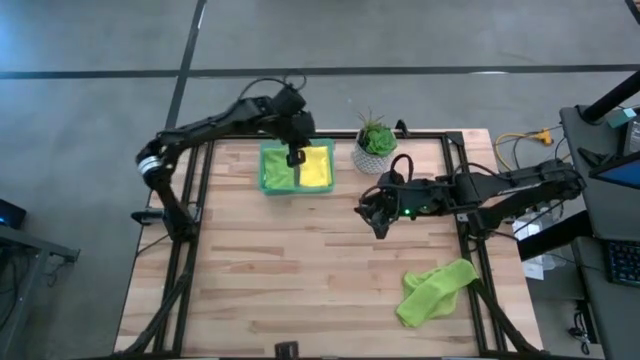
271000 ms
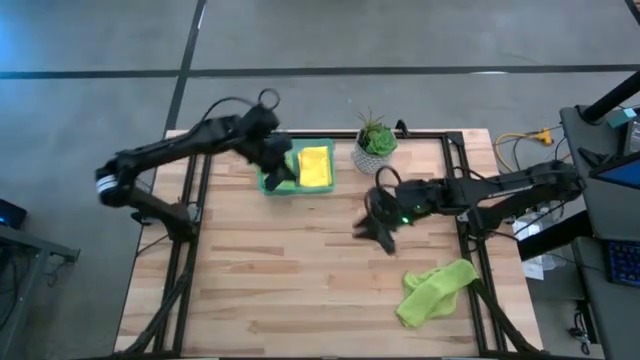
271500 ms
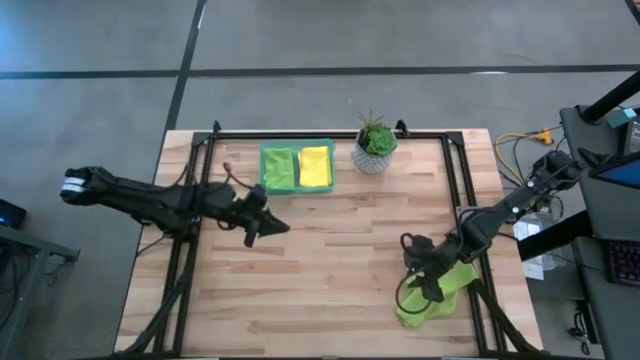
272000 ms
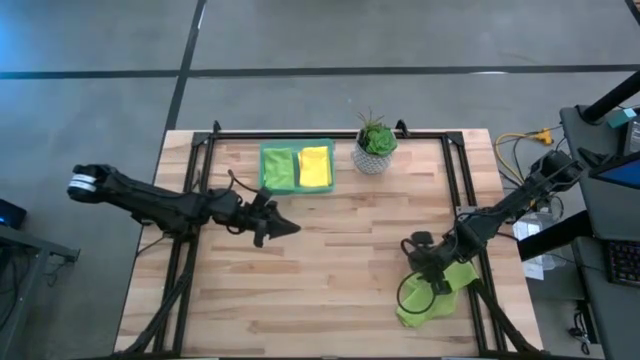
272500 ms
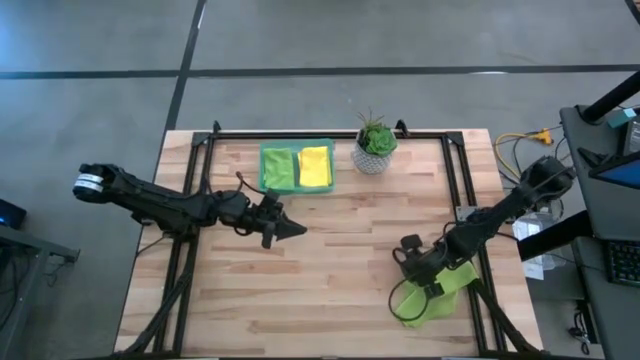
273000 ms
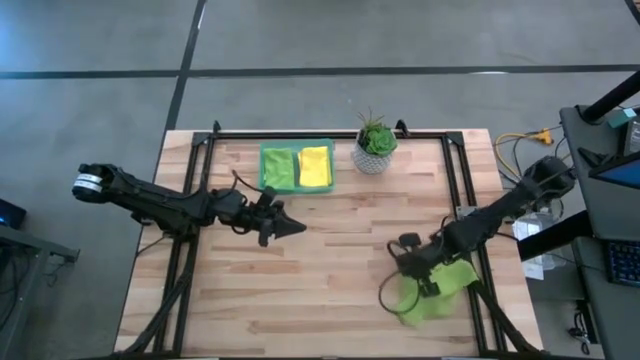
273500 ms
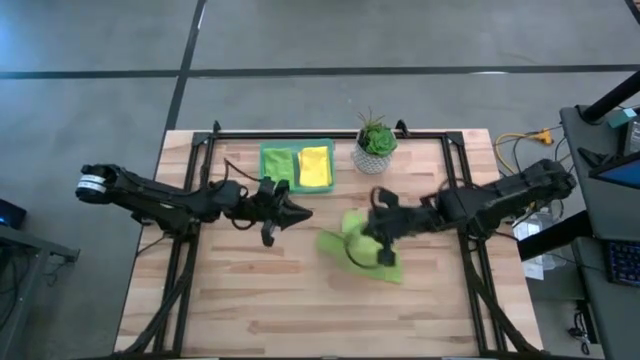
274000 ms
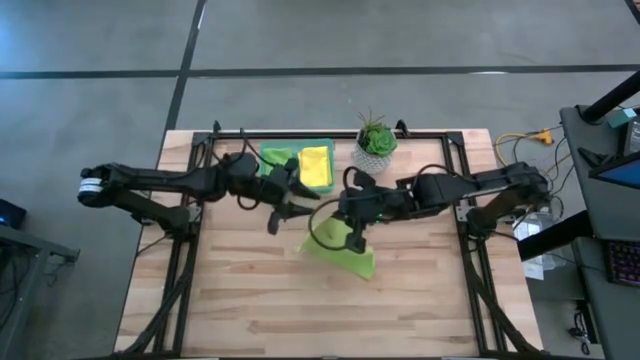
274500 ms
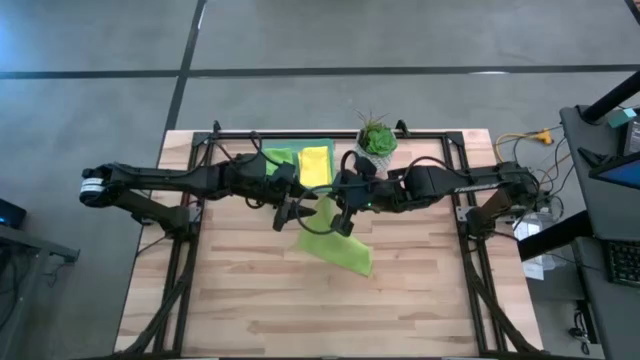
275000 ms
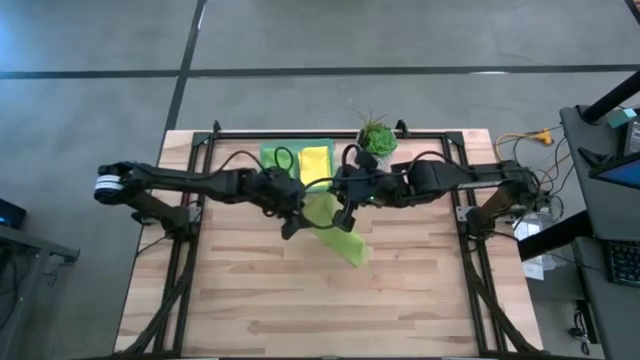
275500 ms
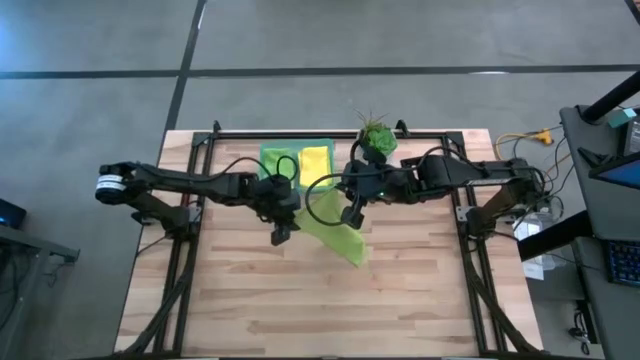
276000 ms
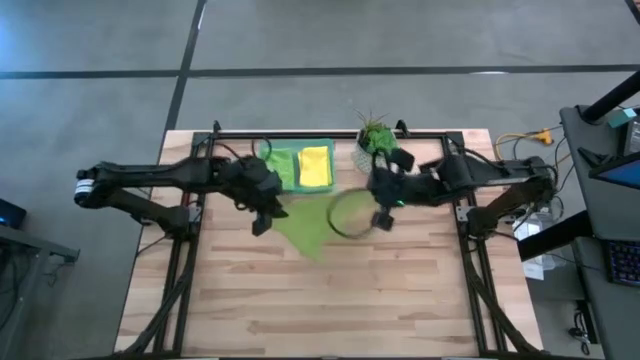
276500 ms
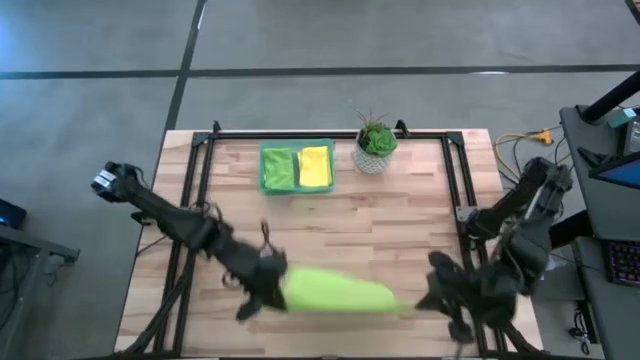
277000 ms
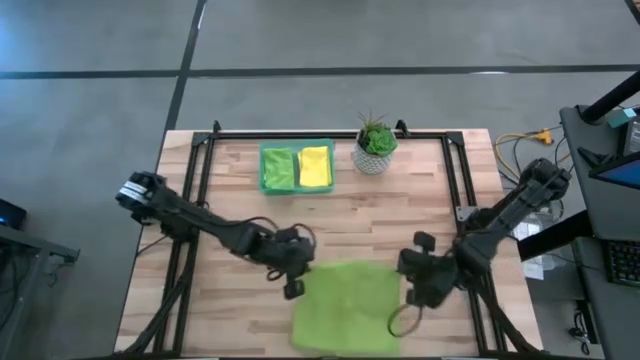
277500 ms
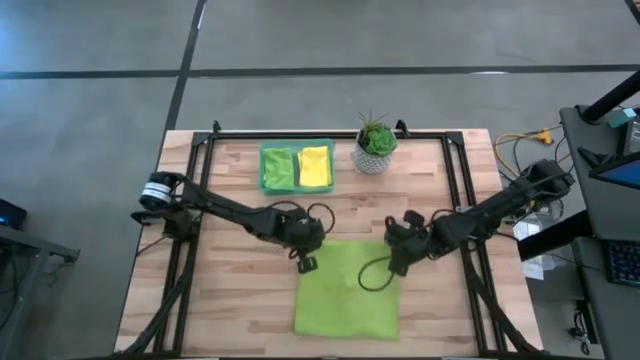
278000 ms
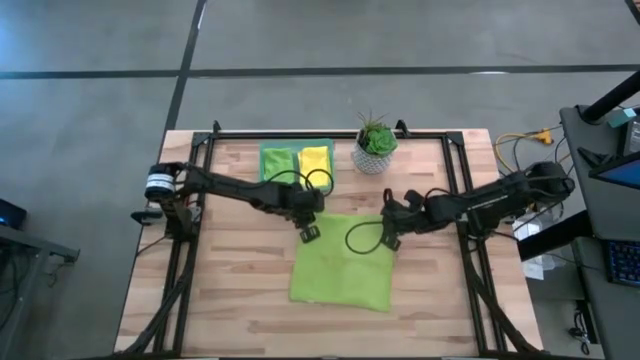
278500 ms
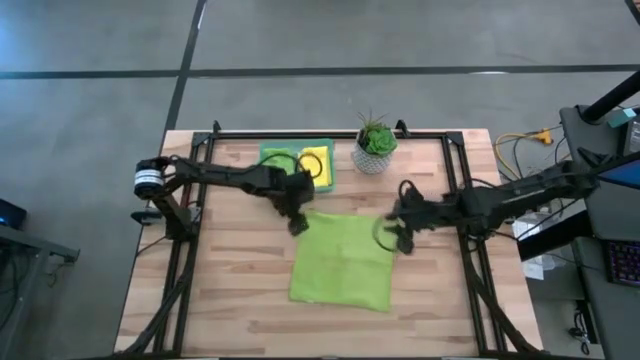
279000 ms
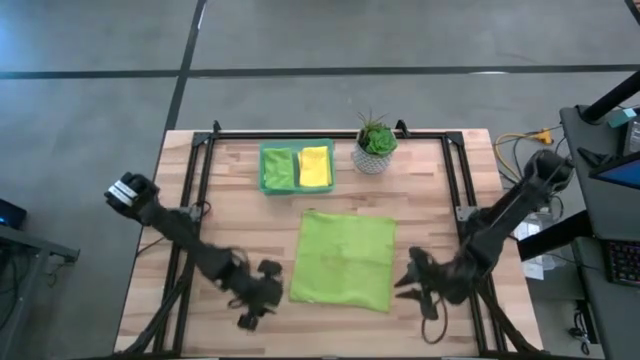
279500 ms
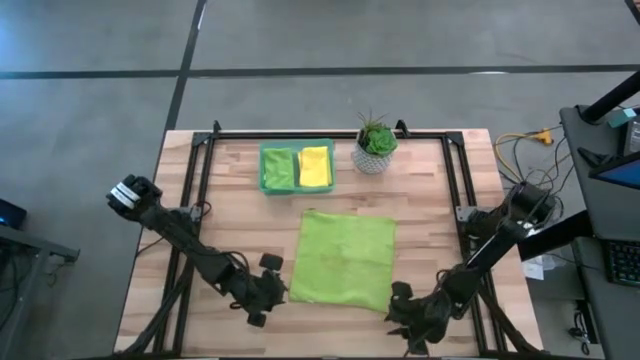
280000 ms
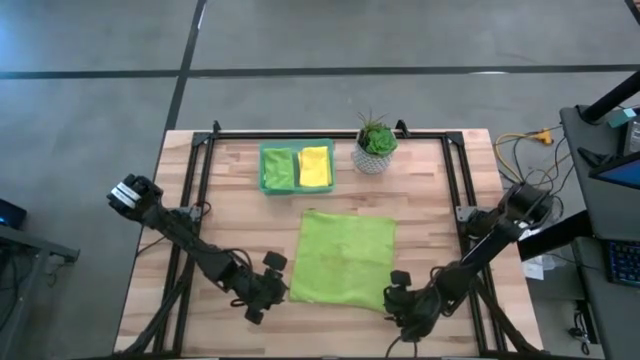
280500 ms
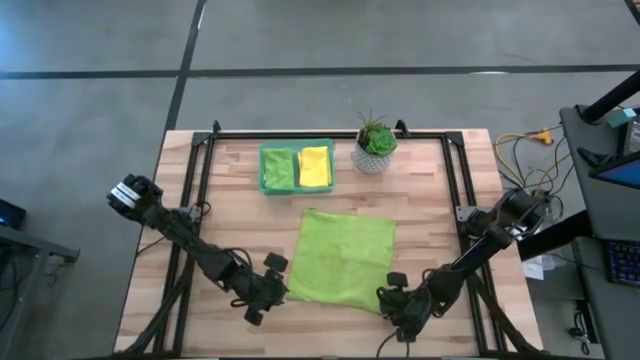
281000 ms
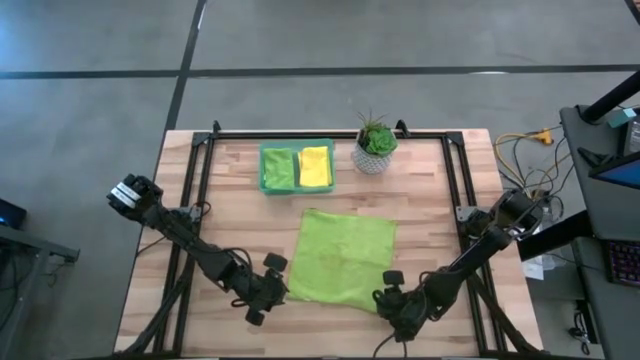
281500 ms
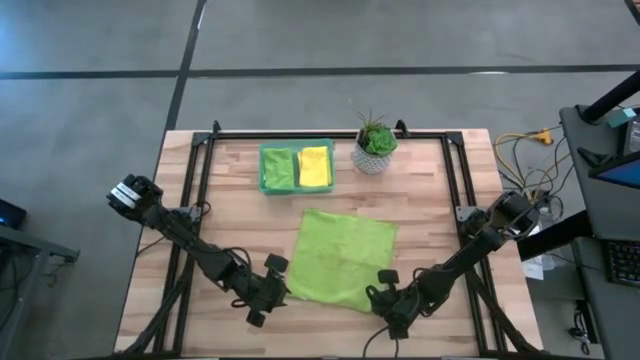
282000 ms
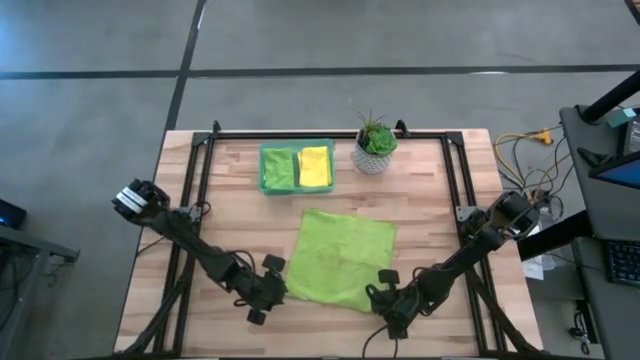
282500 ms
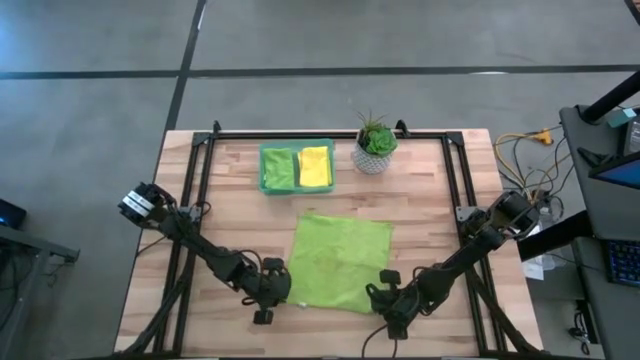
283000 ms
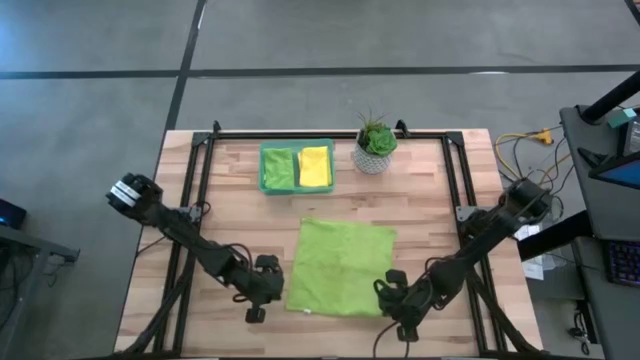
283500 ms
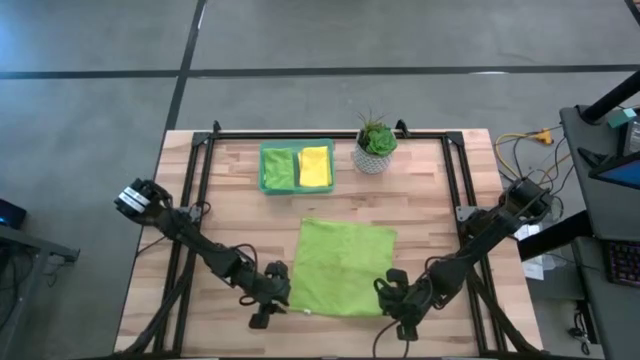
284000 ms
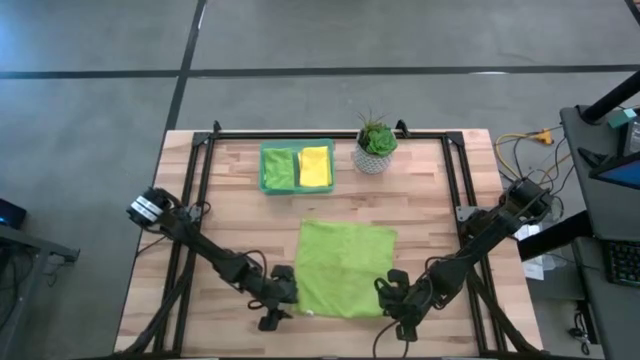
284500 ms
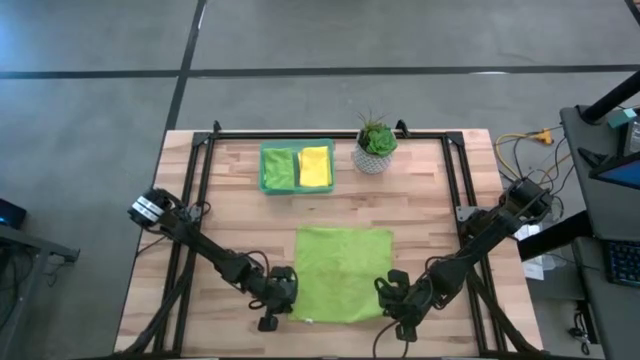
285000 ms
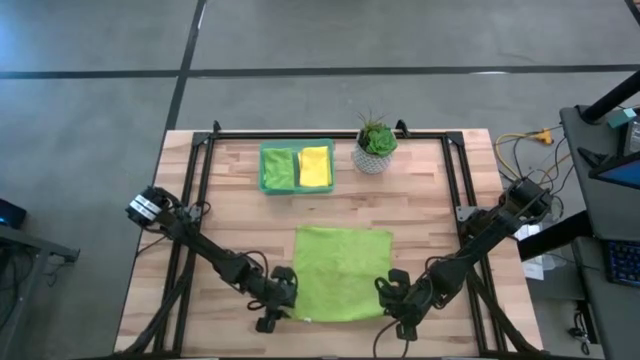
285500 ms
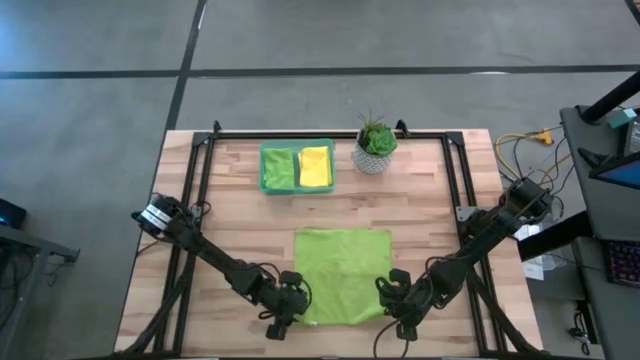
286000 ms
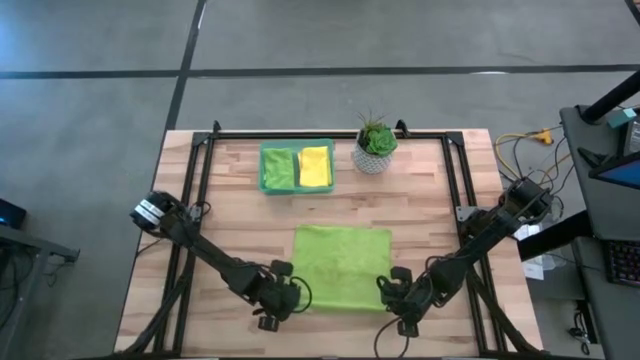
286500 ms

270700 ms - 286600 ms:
Task: Fold microfiber towels
Fold the light green microfiber towel
